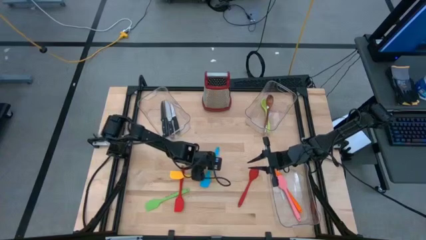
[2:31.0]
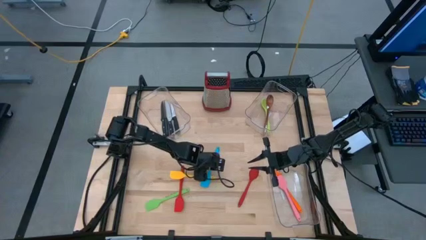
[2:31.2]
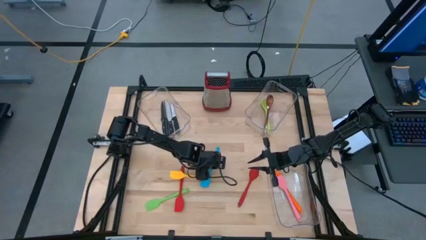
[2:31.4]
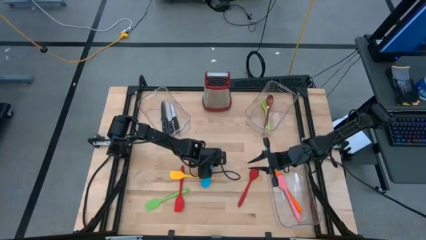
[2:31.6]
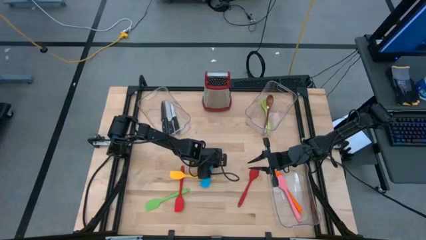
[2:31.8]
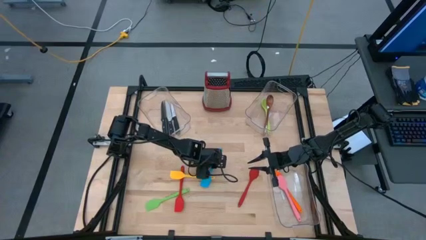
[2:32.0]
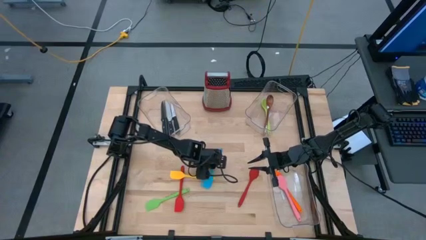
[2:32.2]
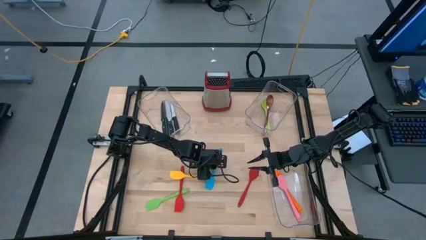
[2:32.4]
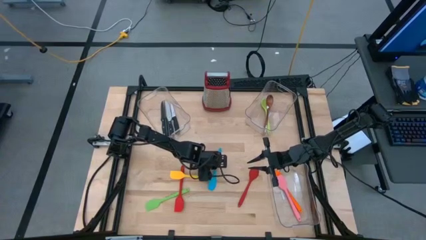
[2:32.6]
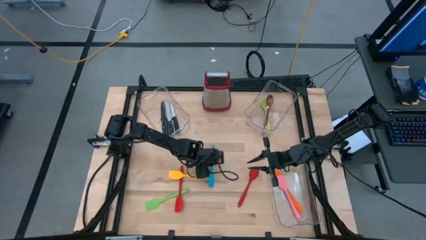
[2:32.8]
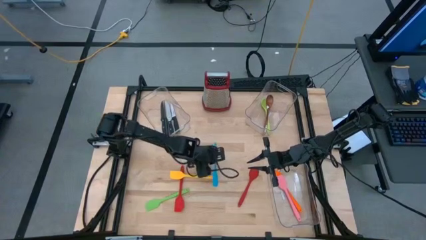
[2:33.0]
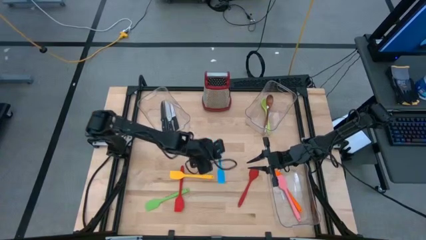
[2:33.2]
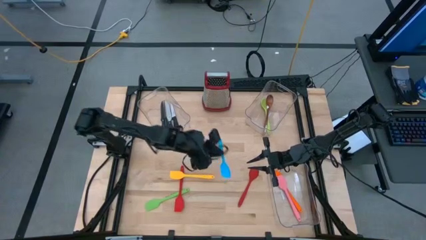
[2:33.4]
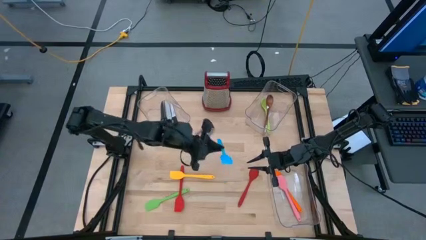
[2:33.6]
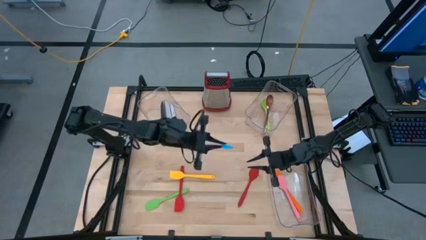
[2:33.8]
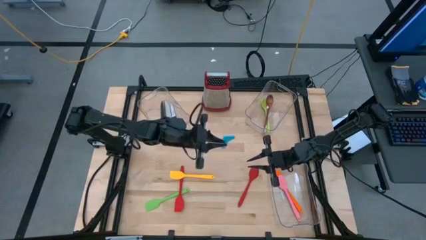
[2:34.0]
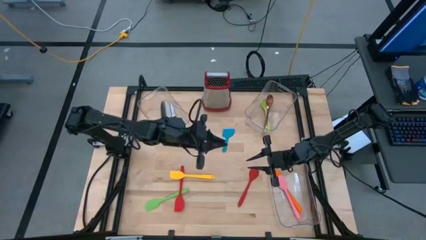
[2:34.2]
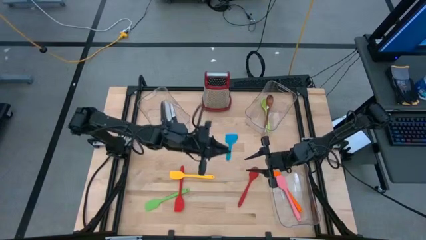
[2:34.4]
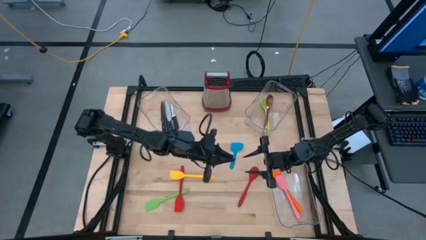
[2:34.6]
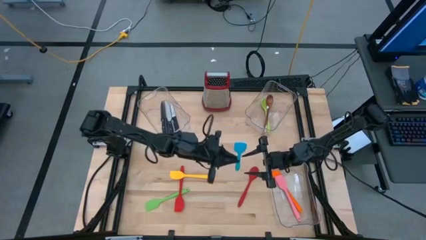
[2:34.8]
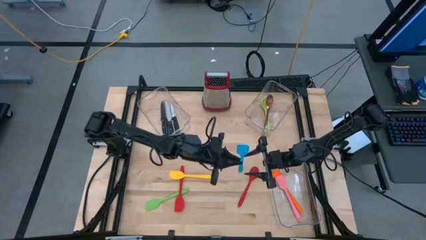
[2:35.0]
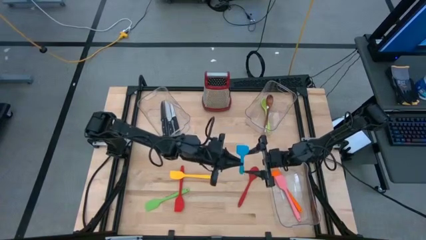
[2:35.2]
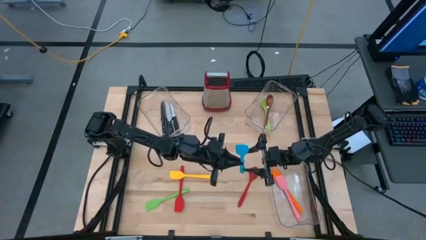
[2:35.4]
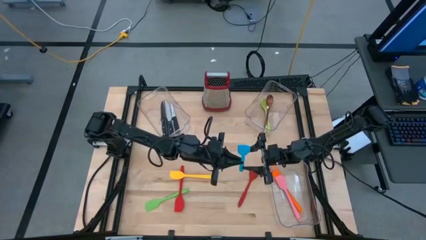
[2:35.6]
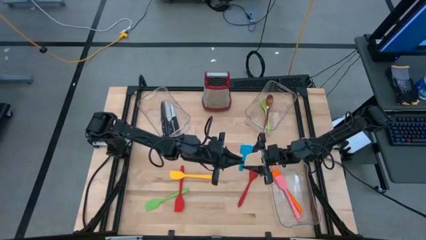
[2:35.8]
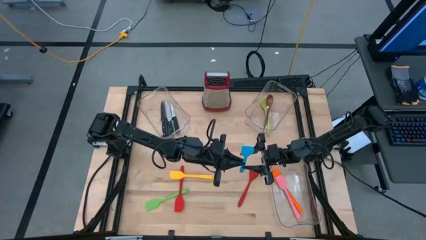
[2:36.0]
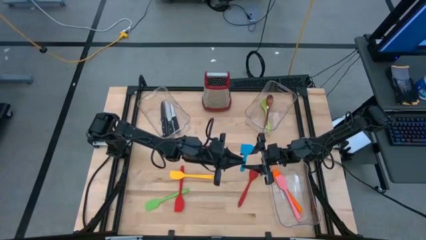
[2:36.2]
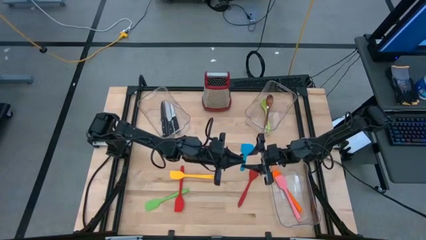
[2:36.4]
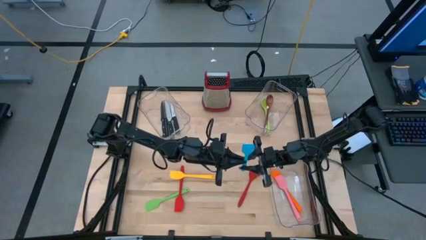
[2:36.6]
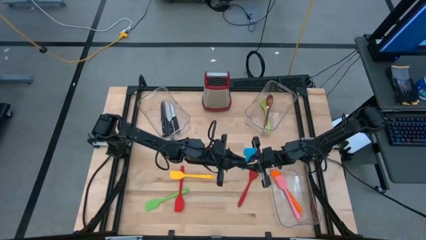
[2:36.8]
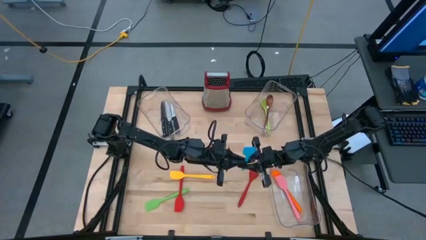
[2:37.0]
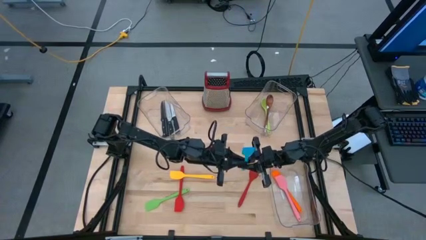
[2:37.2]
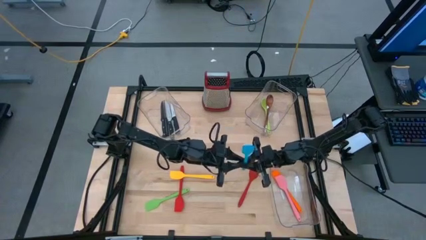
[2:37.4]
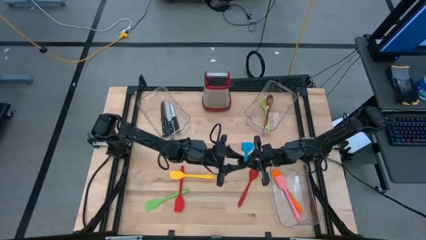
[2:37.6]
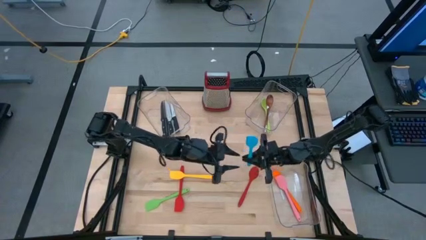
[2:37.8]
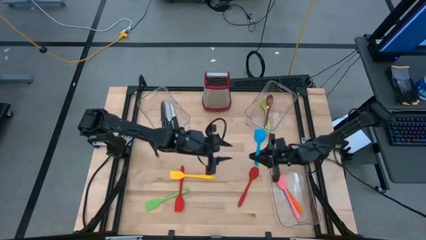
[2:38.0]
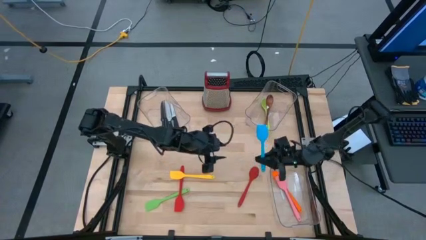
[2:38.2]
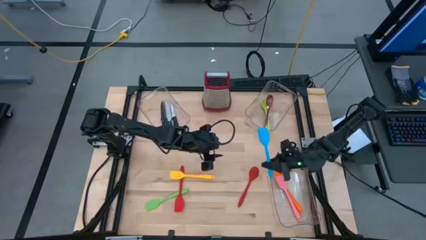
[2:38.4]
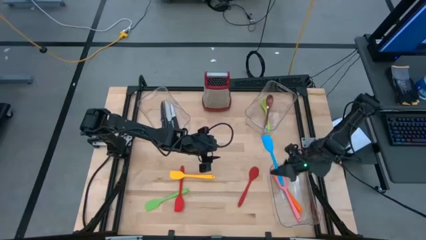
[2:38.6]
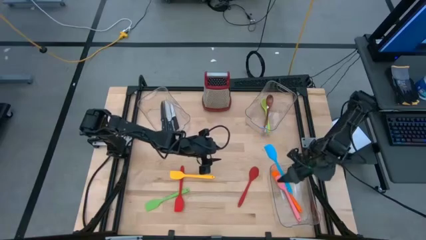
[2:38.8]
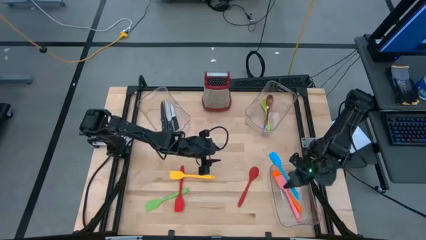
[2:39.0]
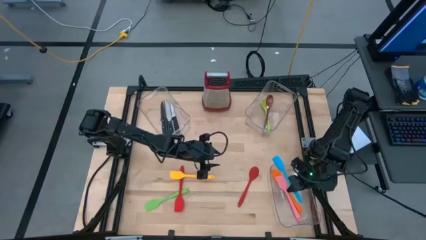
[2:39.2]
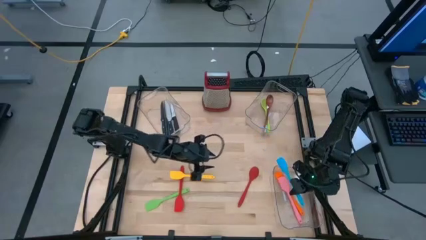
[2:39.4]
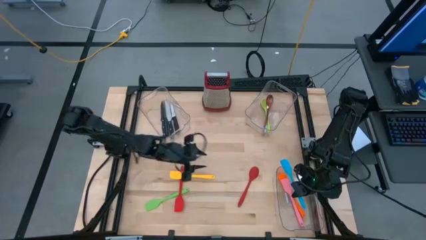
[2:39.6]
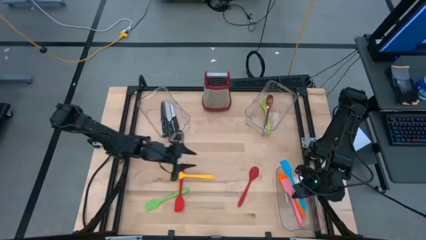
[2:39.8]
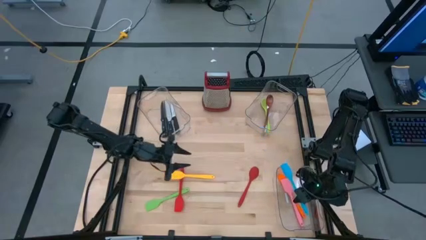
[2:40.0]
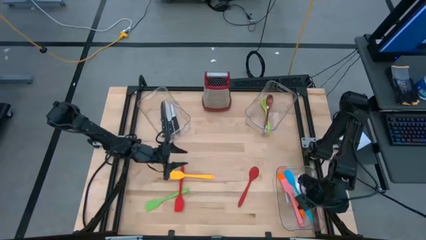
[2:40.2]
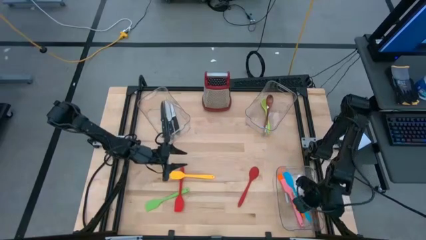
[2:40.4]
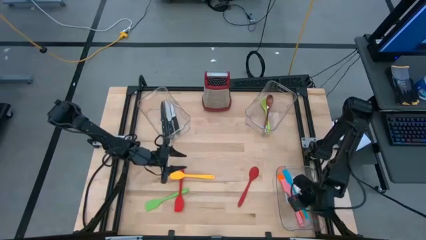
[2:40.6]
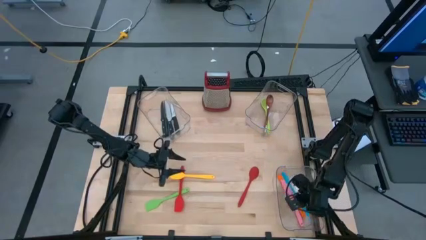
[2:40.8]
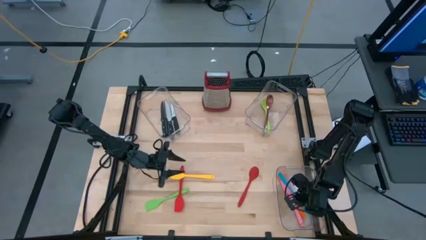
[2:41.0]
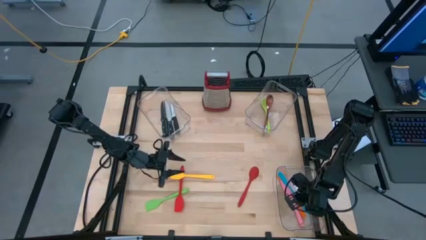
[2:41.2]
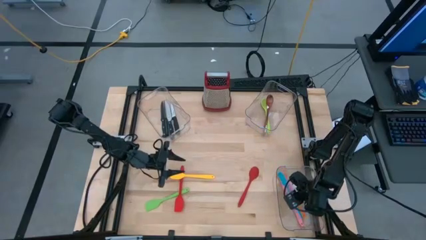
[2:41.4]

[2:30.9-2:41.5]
Task: Pick & Place Kitchen Items
Put the blue spatula into the bottom right transparent bin
